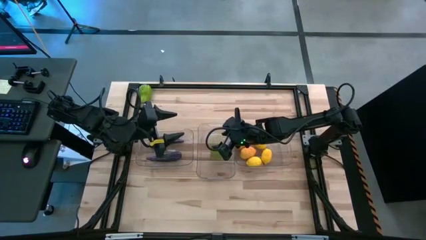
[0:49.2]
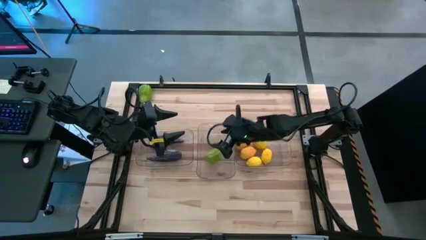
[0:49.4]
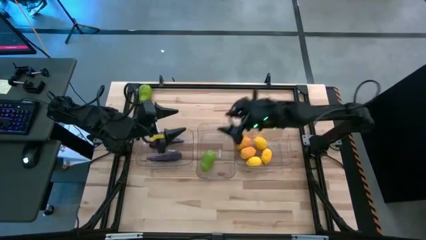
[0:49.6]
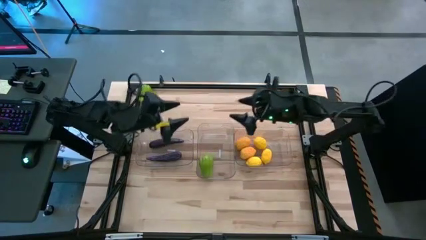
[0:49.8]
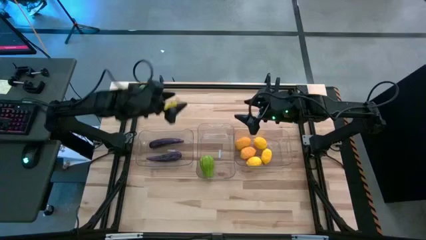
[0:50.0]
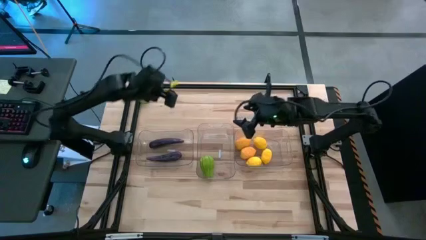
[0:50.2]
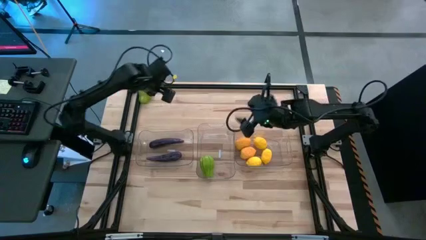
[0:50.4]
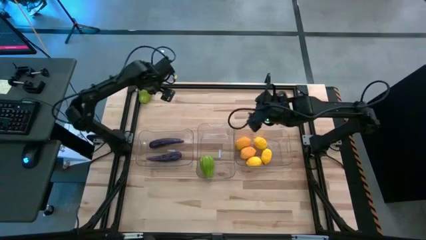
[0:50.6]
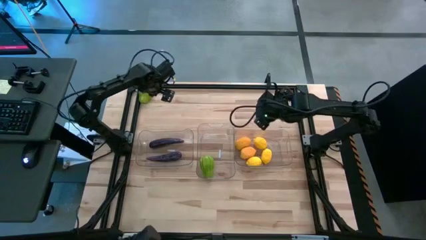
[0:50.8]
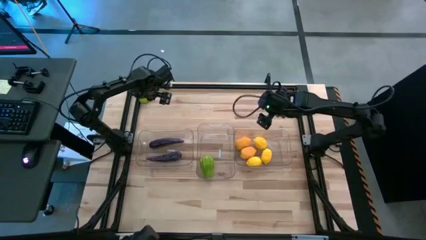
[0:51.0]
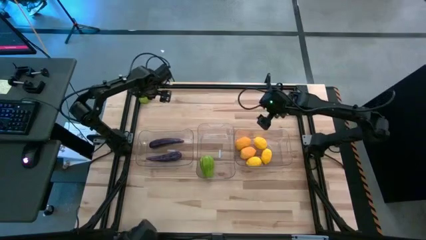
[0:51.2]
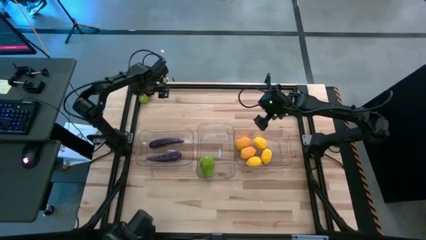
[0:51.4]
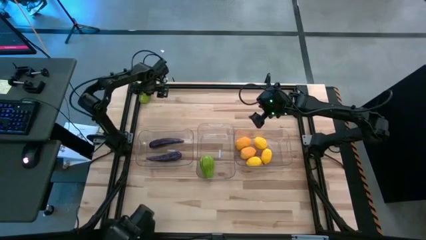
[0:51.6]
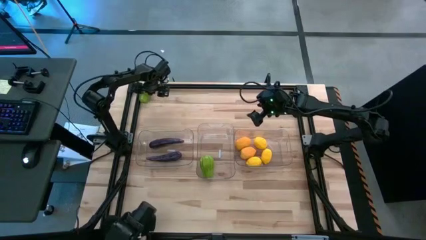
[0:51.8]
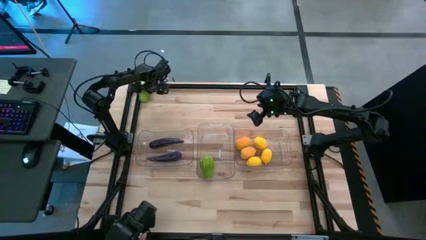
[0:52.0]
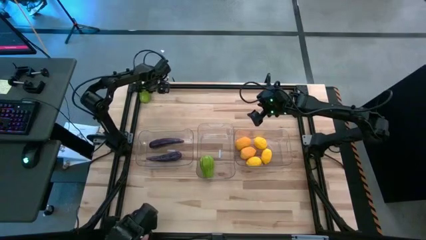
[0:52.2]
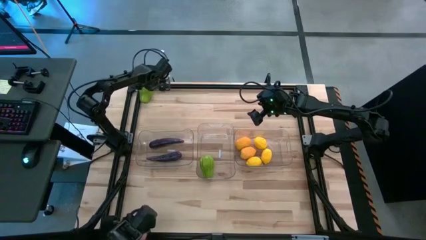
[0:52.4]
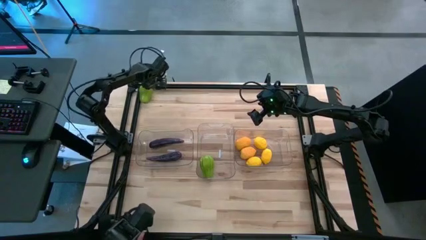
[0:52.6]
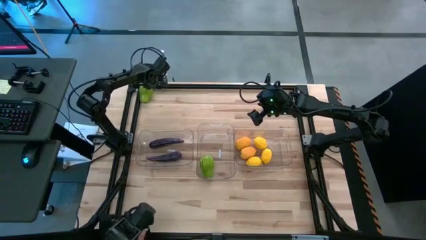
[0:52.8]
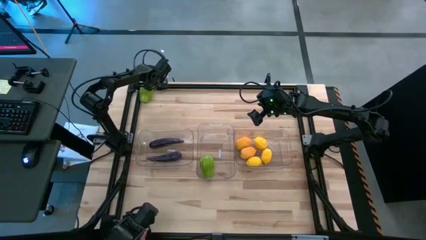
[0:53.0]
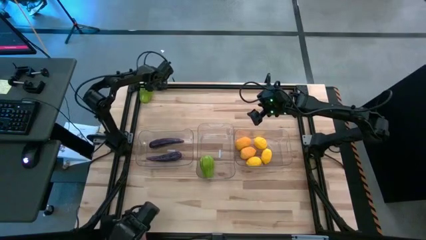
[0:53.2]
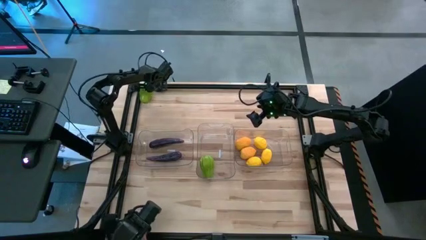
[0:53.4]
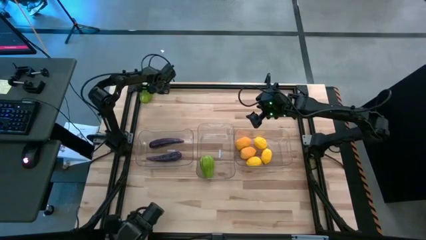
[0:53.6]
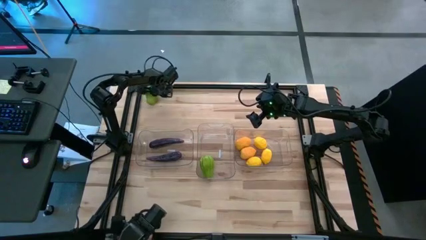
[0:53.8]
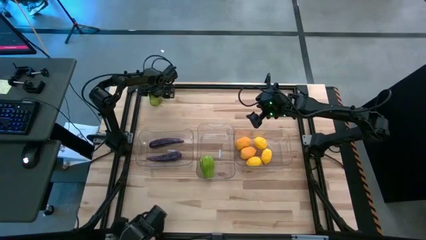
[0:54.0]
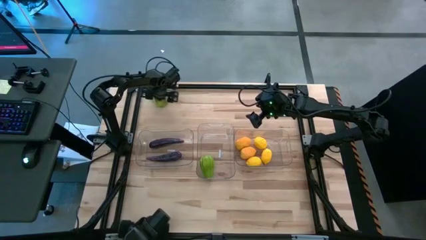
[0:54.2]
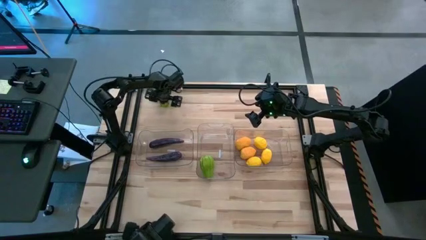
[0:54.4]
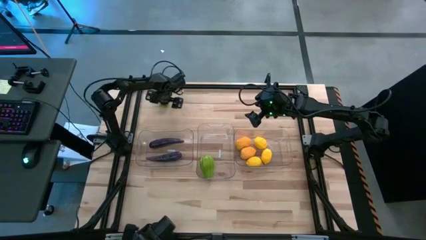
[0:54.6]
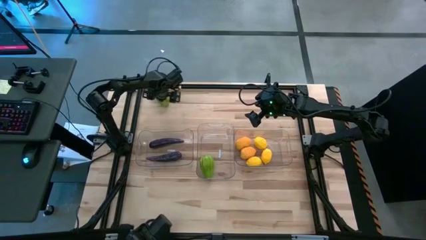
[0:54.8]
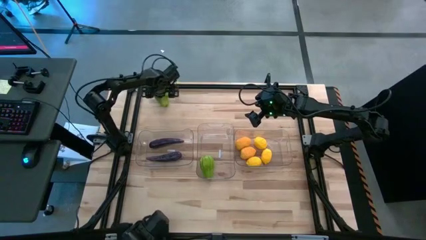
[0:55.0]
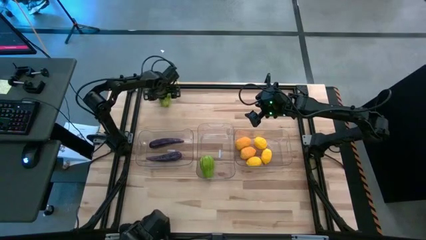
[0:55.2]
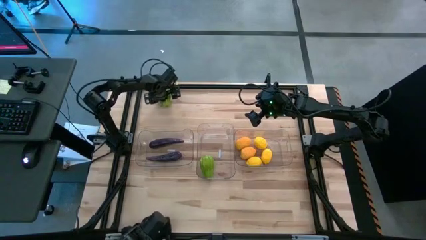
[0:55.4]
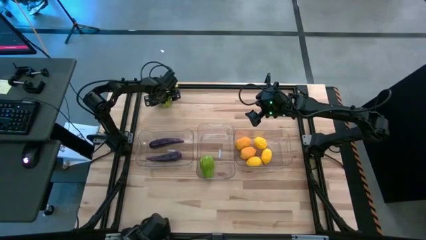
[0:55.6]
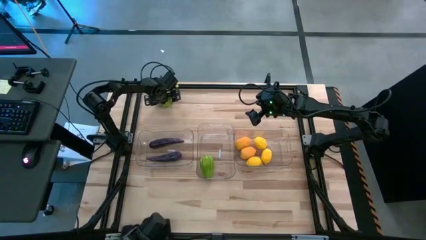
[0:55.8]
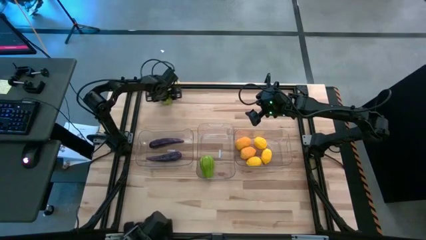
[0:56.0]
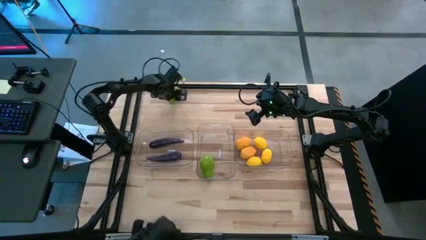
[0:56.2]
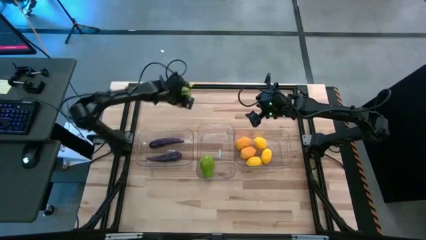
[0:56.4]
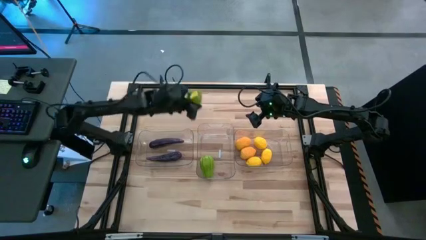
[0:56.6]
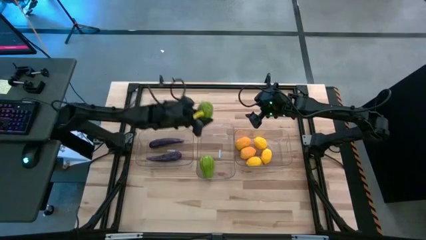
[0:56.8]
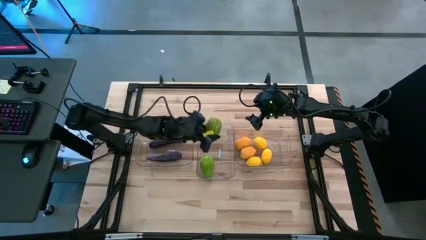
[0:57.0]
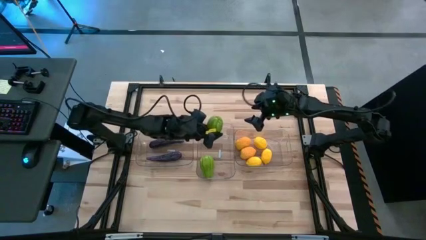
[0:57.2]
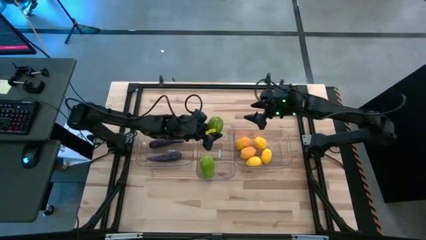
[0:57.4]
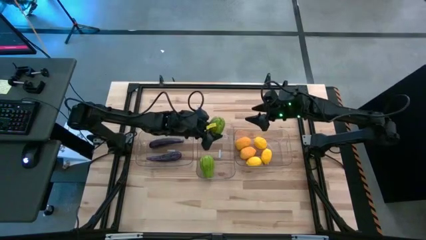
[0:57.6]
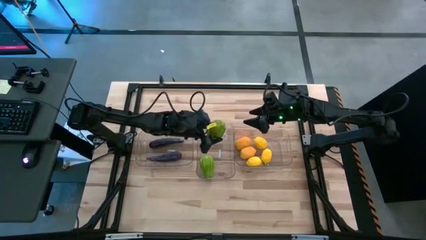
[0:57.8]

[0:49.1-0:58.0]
Task: Sort produce into baskets
Put the chayote into the middle transparent bin

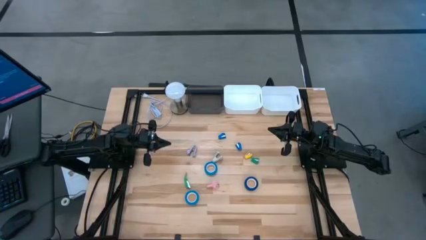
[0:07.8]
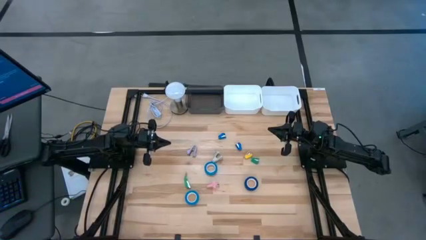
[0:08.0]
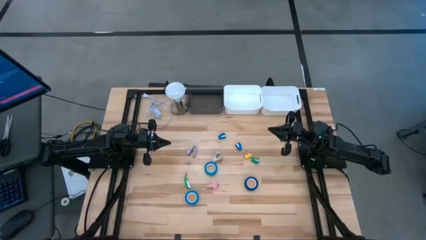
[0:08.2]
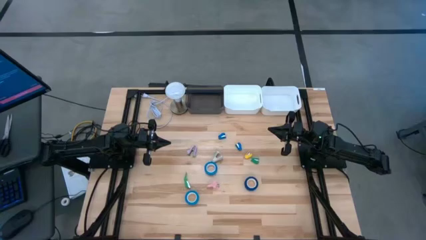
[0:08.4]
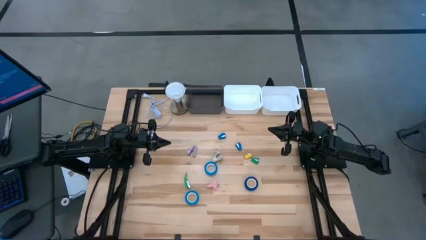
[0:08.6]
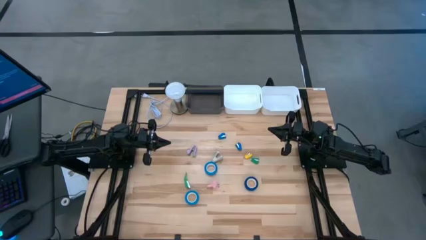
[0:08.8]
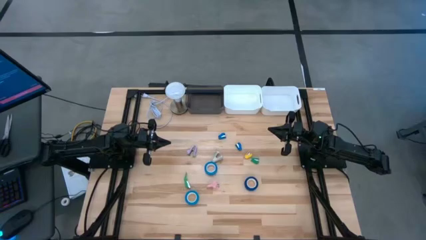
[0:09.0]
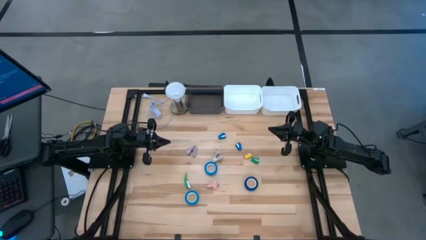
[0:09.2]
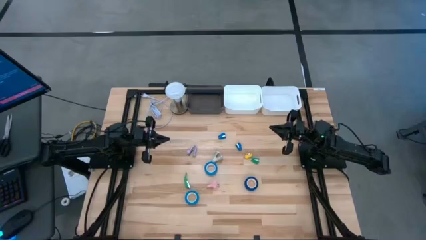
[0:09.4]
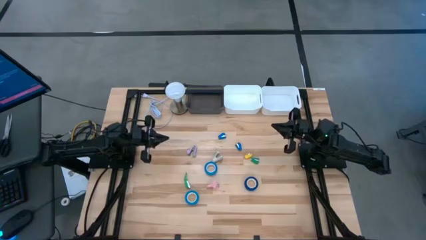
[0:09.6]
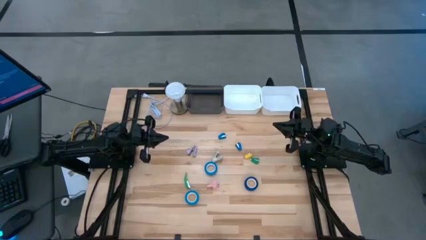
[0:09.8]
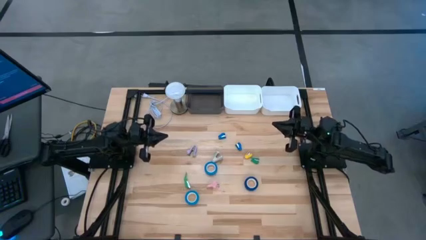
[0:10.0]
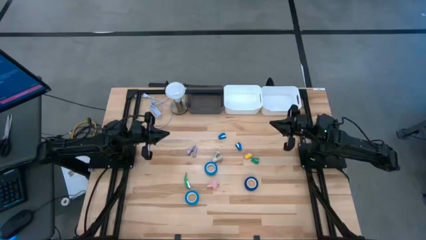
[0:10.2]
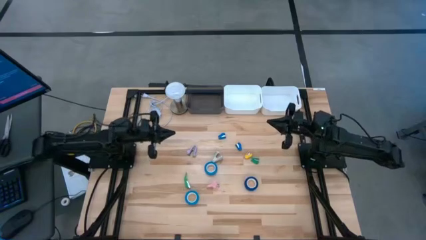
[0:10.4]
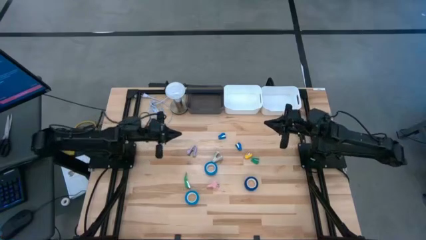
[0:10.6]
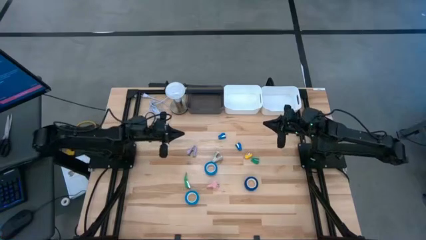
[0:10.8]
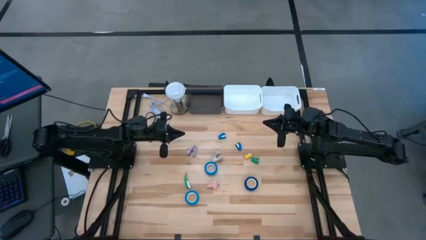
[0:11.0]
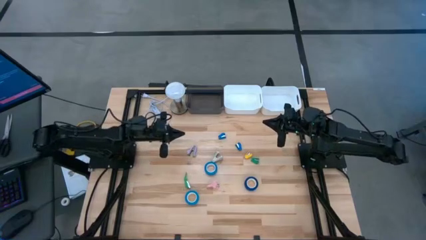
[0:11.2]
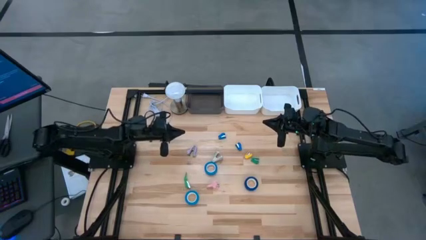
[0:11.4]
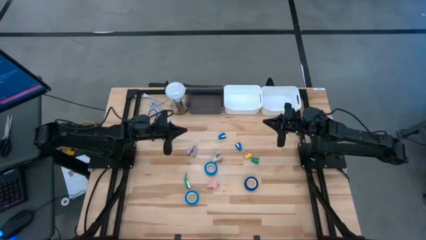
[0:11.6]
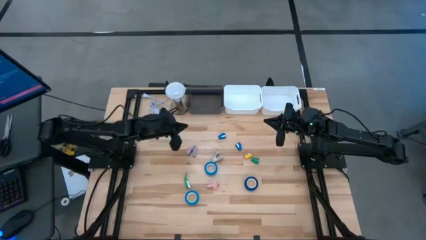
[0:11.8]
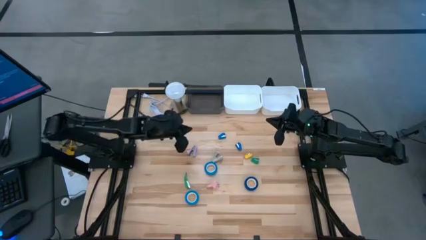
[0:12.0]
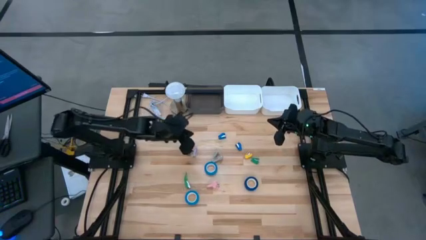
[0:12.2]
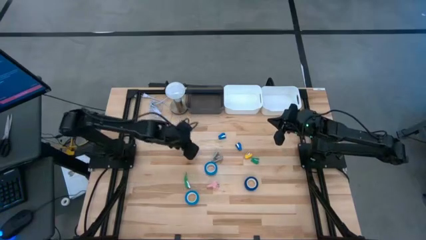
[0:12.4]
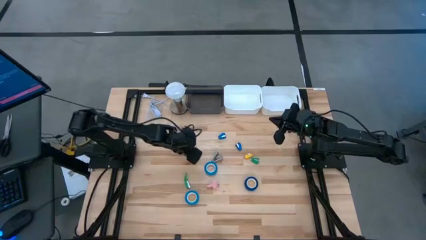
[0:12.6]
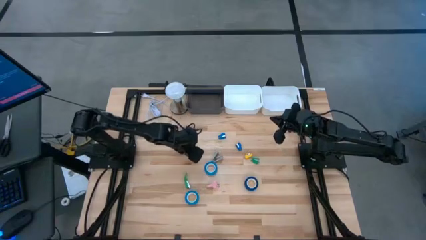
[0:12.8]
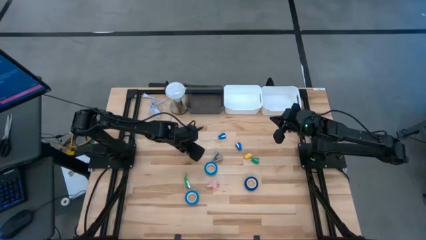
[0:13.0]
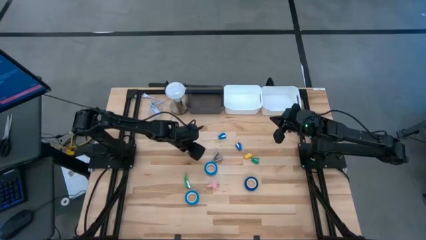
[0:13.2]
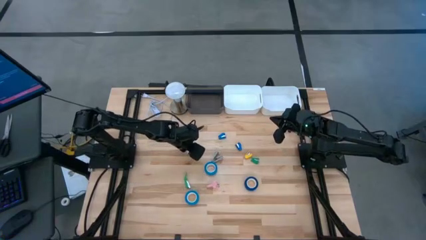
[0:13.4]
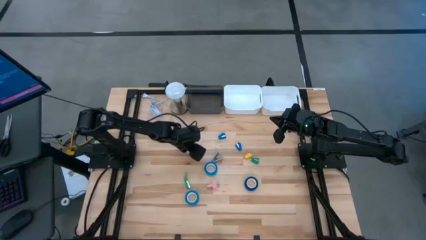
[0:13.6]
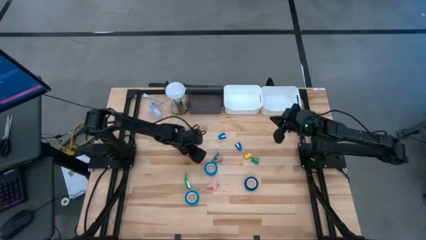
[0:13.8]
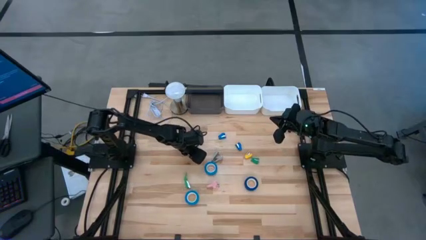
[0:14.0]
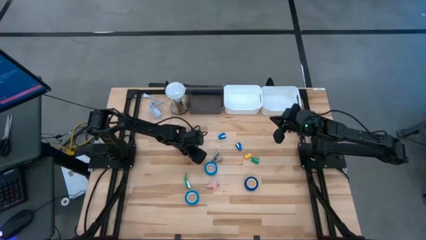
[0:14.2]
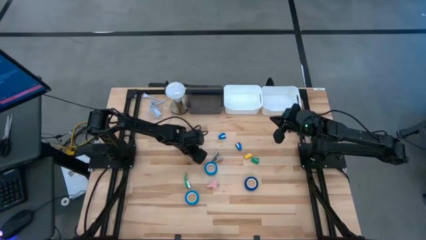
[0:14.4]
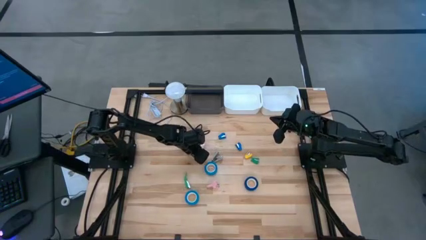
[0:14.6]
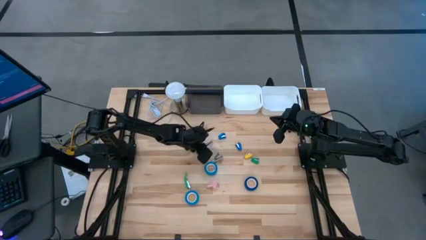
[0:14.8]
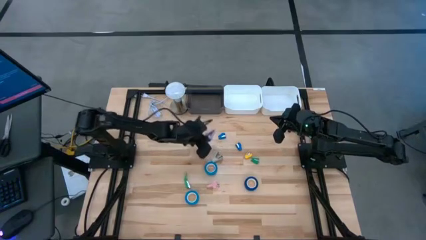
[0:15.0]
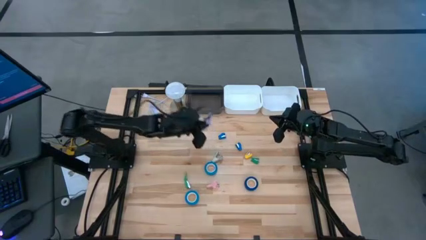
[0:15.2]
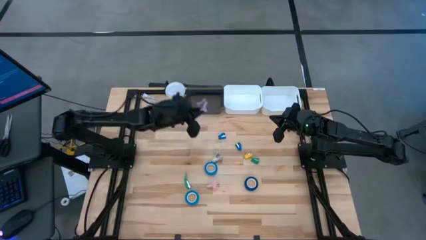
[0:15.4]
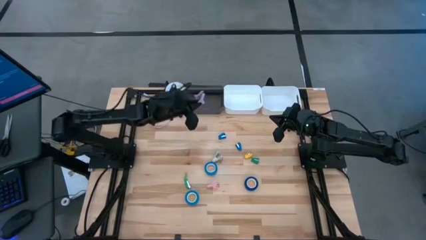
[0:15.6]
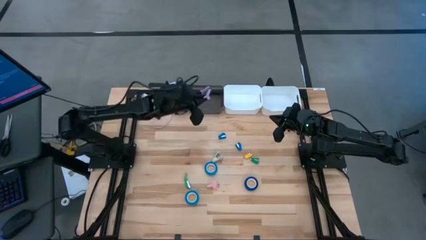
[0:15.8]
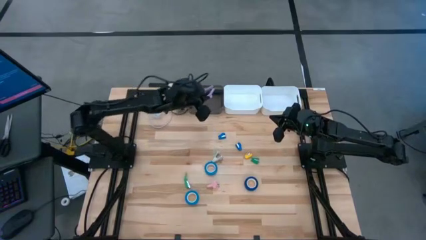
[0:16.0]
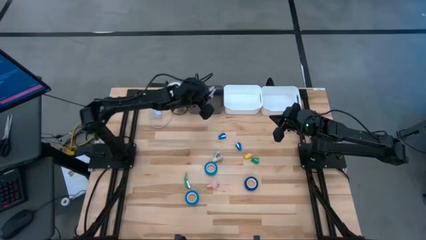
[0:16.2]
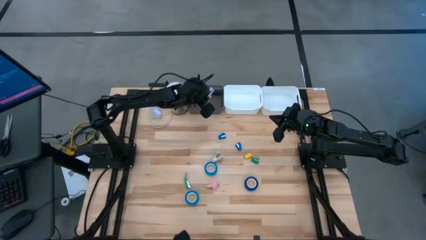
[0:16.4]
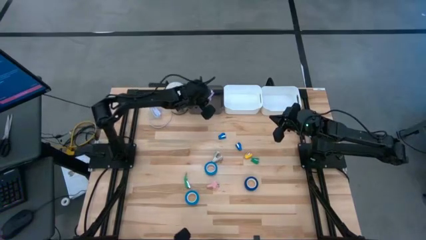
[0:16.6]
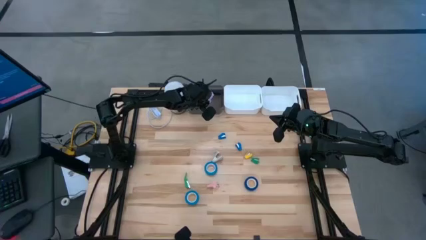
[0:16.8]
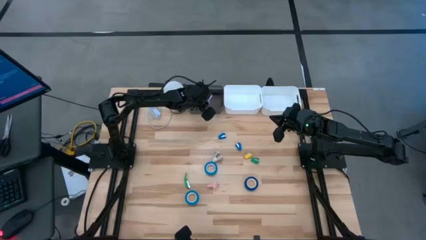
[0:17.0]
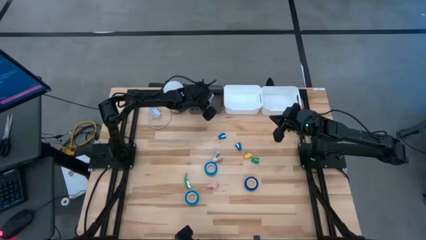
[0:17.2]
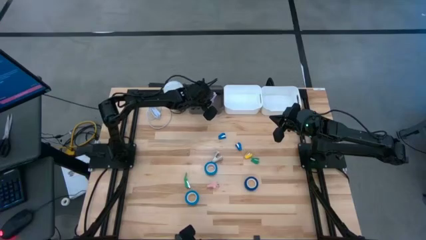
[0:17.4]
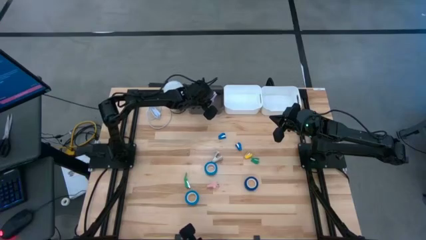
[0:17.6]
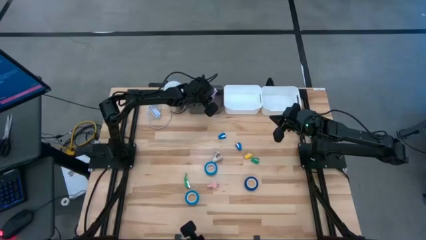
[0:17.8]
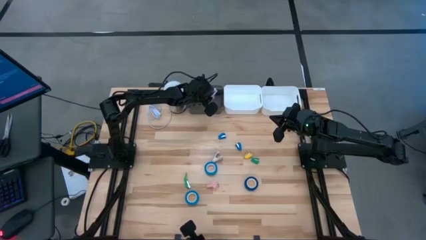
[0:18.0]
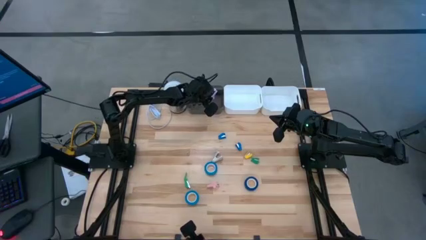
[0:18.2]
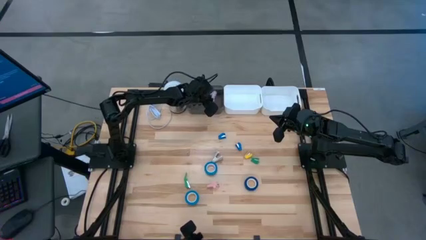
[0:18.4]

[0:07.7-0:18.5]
Task: Pick and place Stapler, Stapler remover, tape
Put the purple staple remover into the black bin
